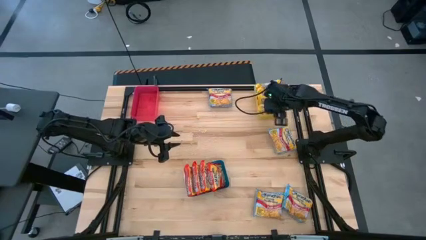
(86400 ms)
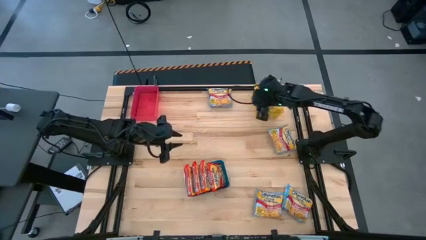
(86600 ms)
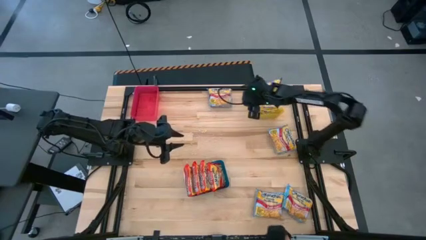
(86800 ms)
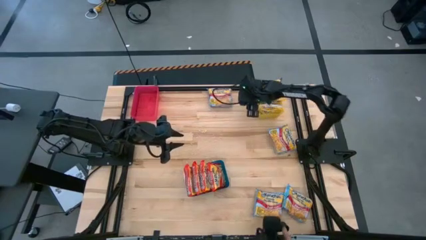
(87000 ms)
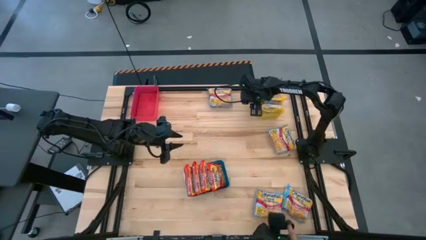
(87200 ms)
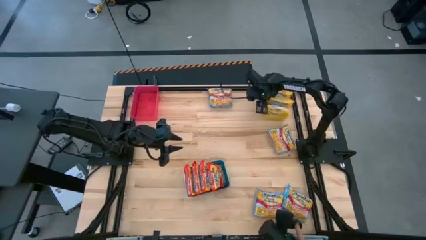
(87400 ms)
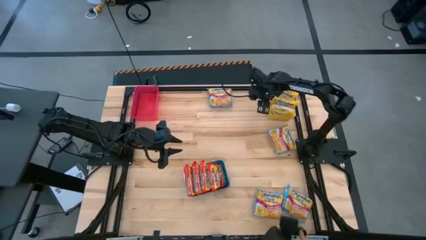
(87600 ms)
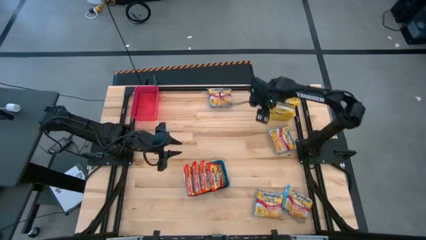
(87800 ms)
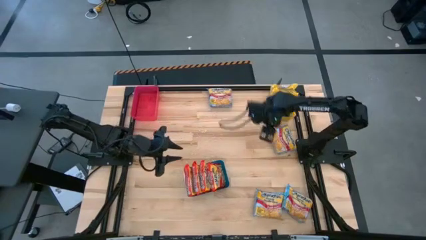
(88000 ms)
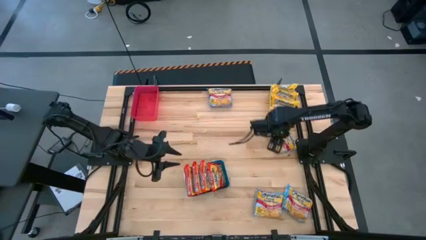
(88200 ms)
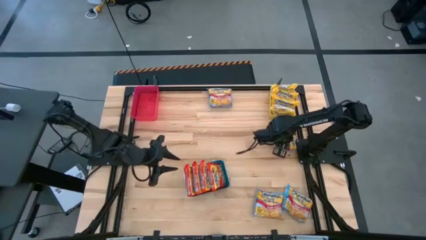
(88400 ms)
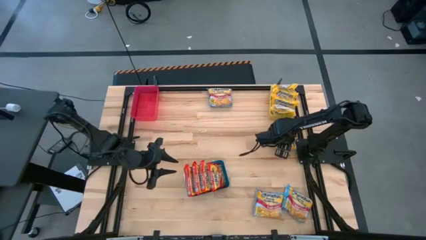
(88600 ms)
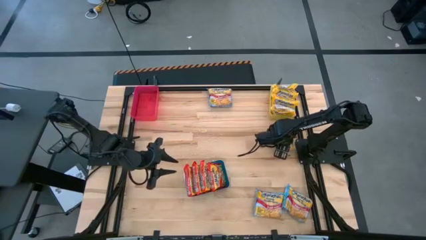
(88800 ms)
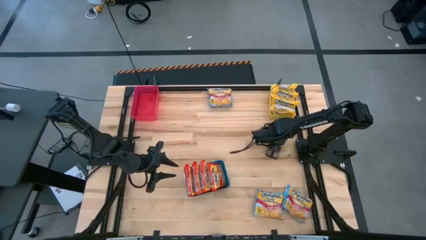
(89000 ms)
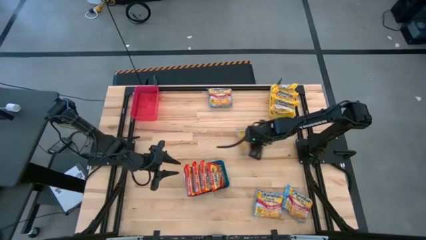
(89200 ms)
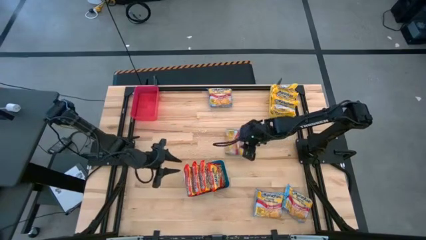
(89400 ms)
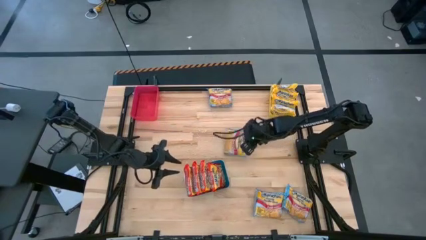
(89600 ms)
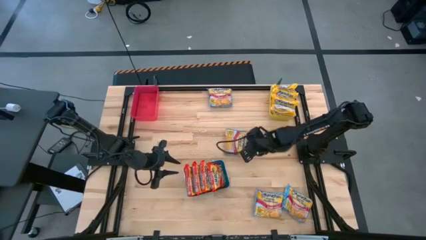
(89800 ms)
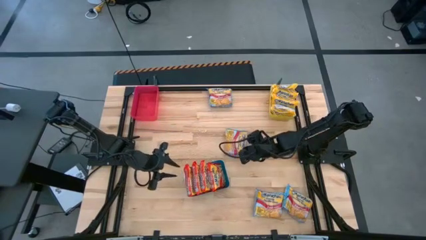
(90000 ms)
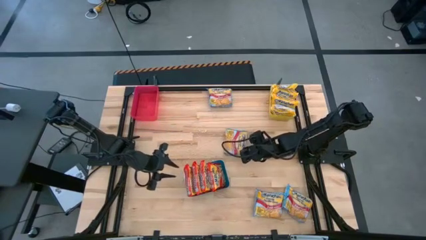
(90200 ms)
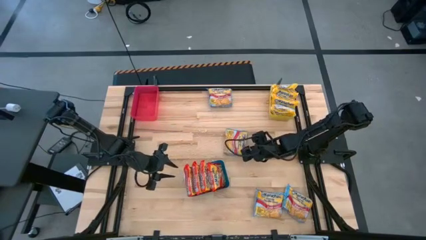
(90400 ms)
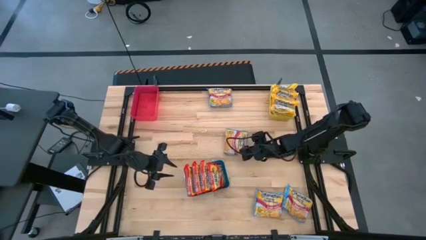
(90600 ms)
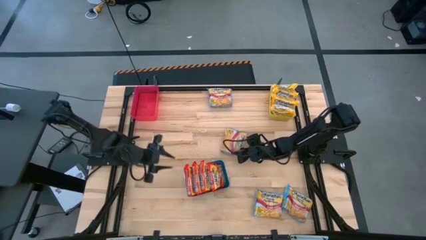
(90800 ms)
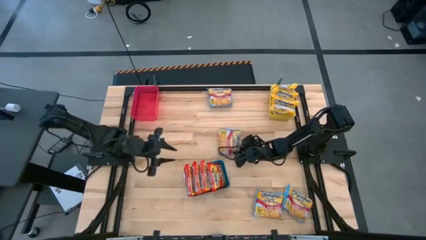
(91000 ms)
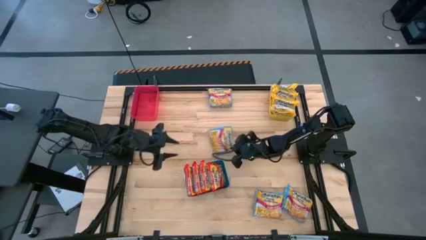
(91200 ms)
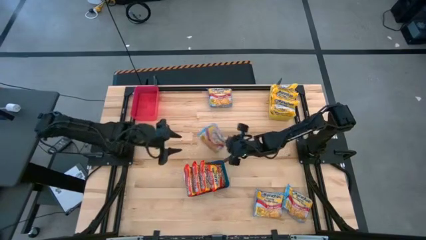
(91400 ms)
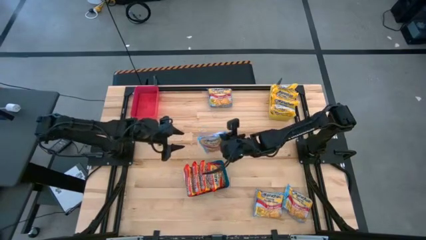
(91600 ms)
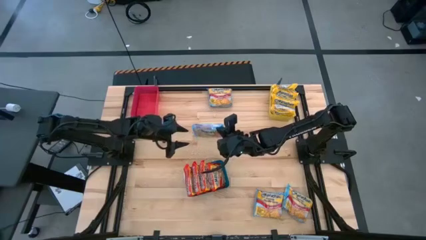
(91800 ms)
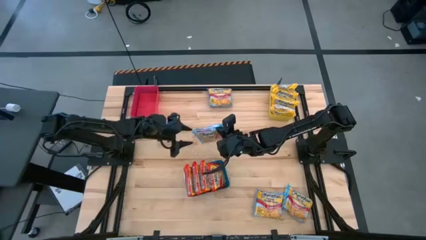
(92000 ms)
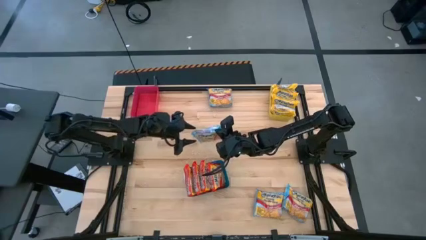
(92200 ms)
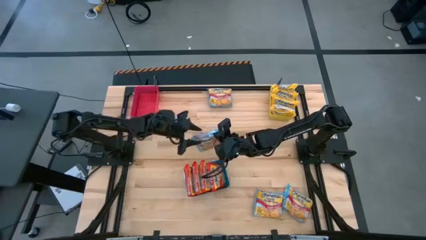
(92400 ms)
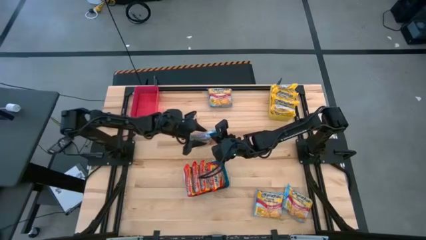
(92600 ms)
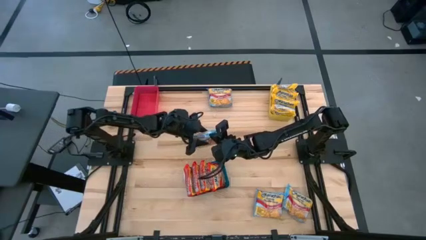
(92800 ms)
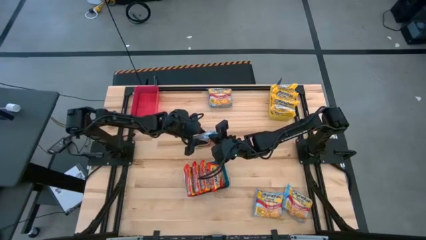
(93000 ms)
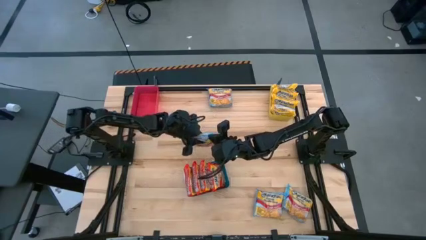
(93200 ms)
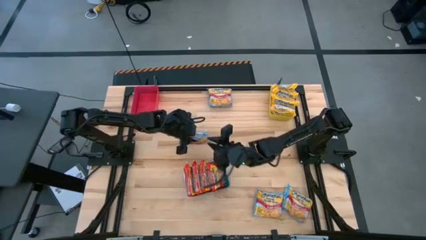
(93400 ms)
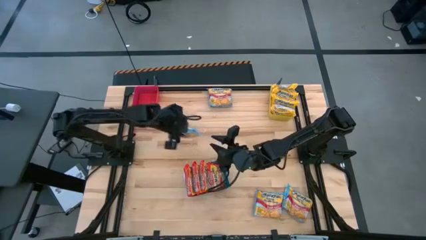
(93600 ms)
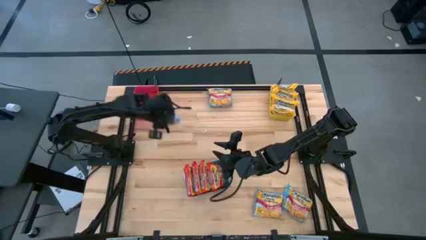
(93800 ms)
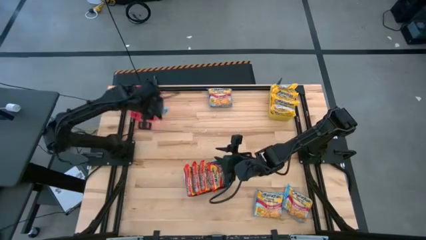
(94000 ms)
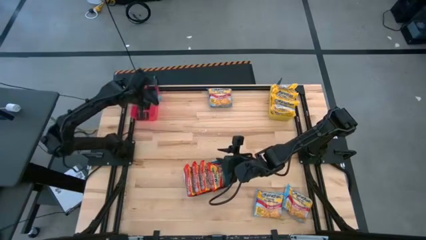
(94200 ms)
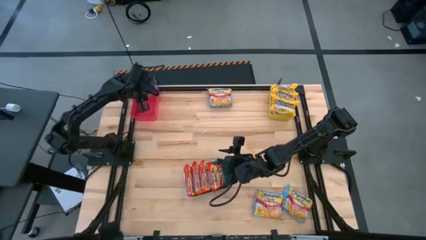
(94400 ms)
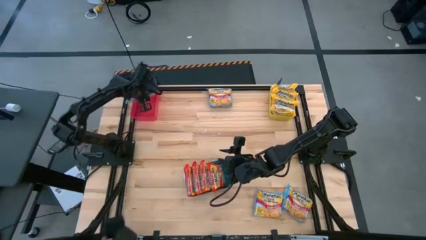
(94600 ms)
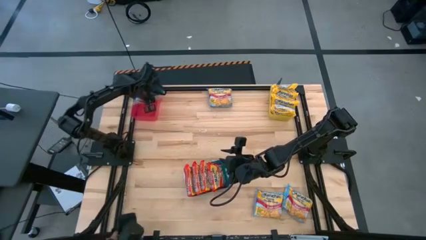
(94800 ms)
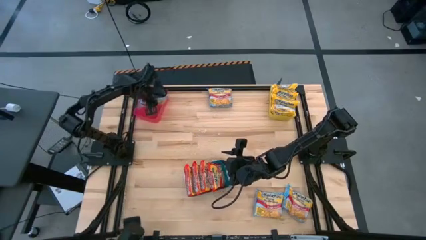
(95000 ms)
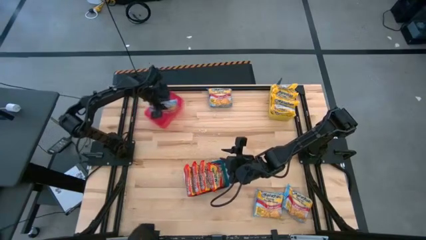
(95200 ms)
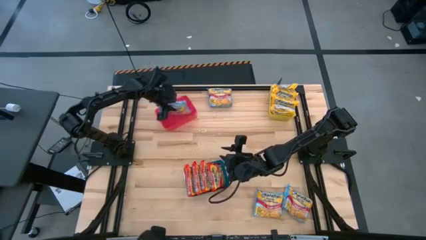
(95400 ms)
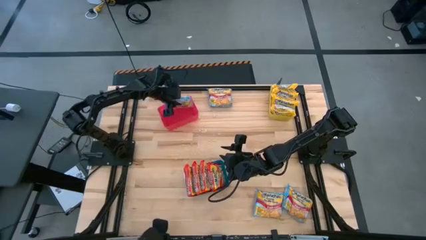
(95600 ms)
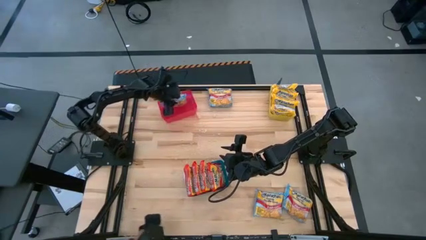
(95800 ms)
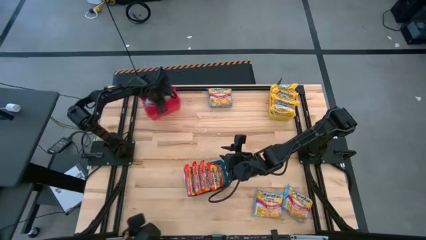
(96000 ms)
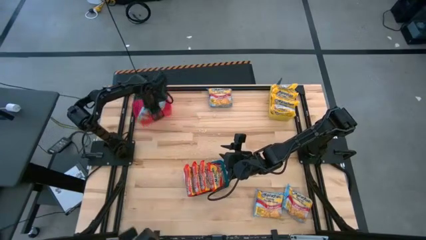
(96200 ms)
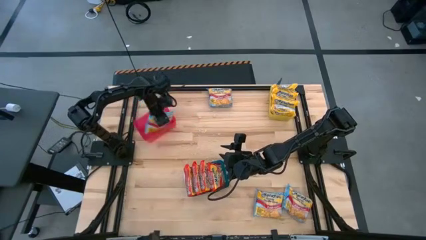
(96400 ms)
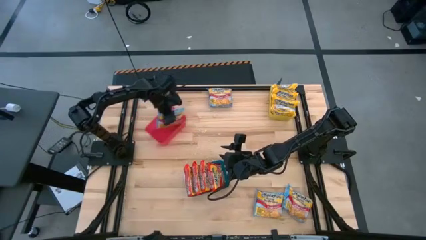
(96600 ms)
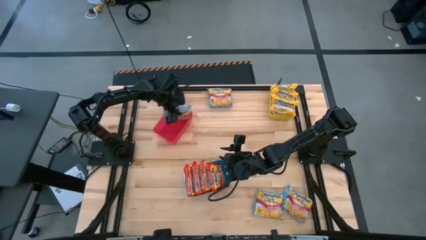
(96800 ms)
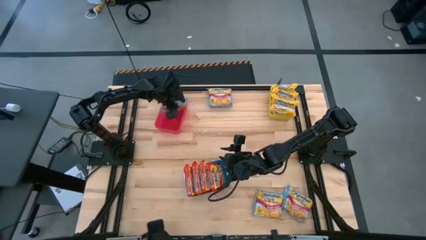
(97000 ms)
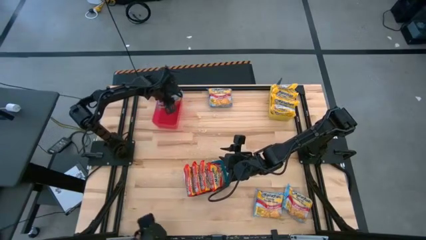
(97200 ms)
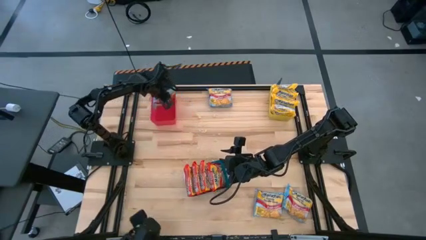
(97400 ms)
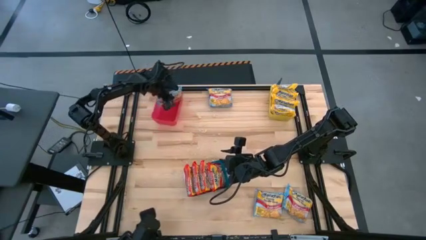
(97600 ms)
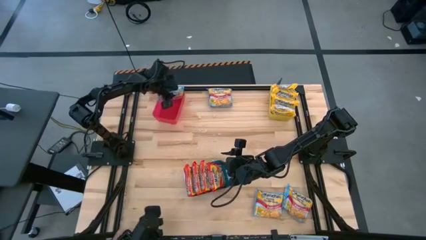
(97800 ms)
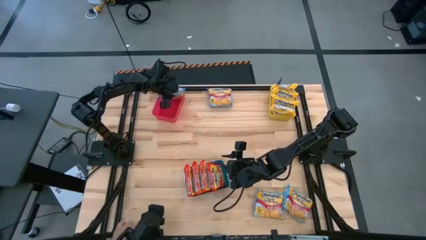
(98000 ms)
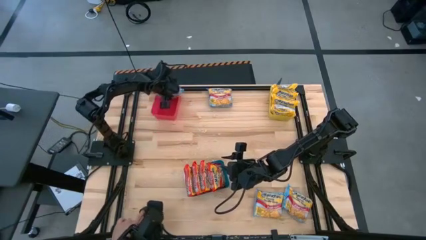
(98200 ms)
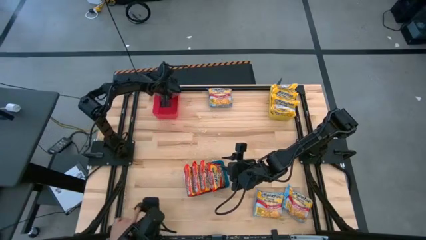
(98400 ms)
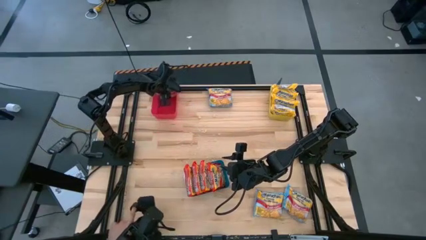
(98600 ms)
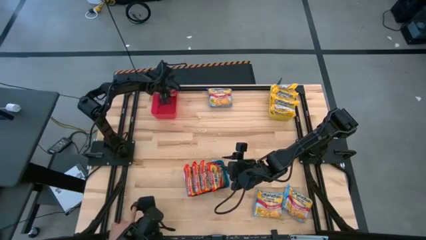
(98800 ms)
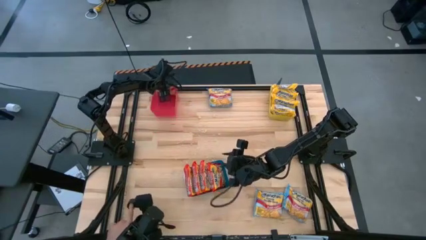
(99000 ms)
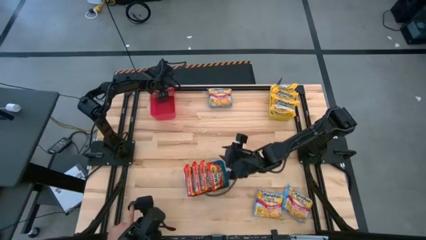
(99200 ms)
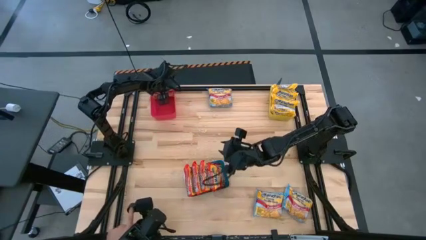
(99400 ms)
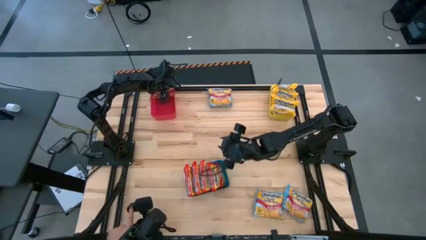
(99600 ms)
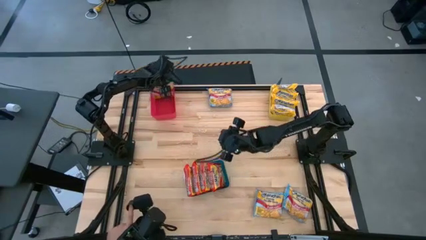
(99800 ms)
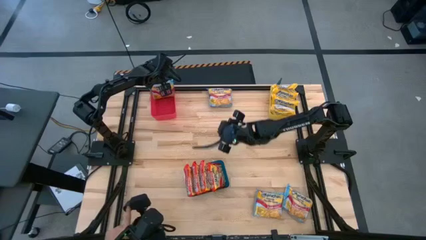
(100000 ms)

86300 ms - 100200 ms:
Task: Sort Maruchan noodles
Put the middle blue noodle pack into the red bin

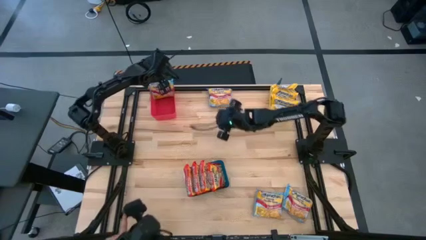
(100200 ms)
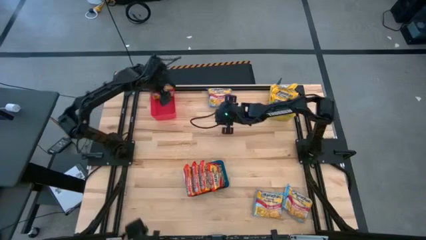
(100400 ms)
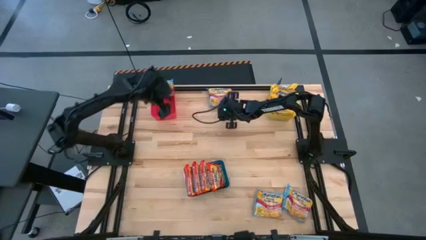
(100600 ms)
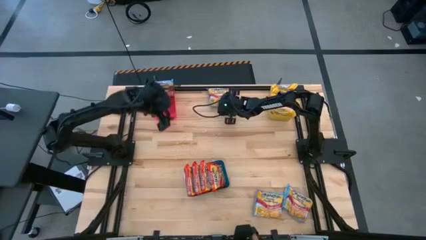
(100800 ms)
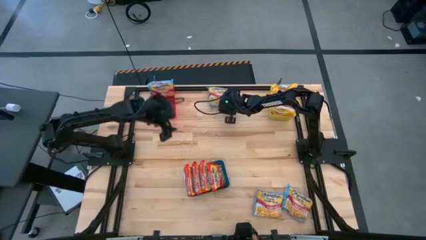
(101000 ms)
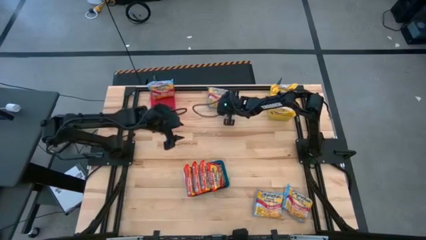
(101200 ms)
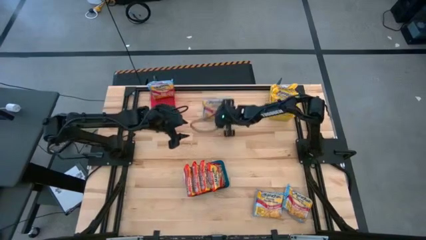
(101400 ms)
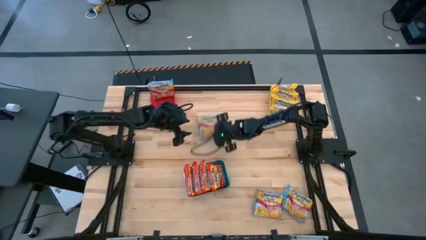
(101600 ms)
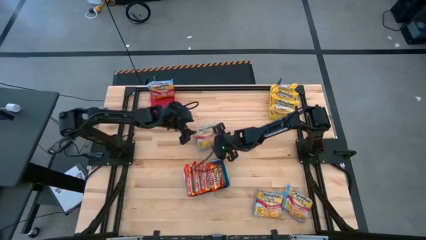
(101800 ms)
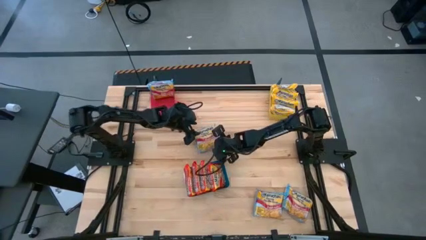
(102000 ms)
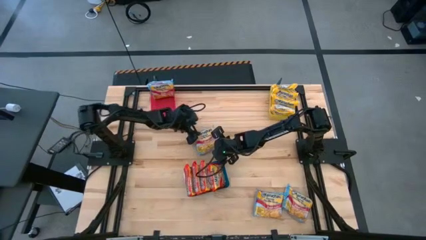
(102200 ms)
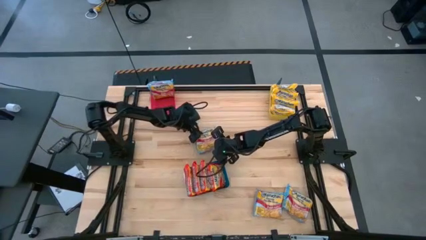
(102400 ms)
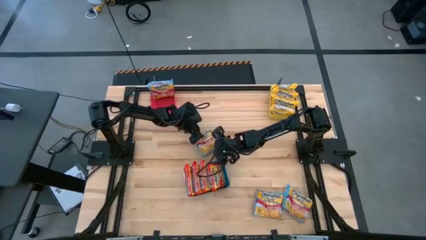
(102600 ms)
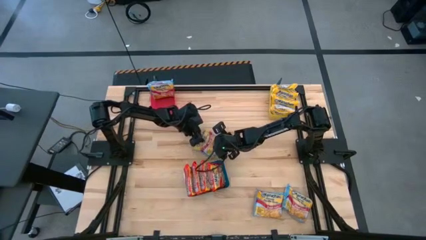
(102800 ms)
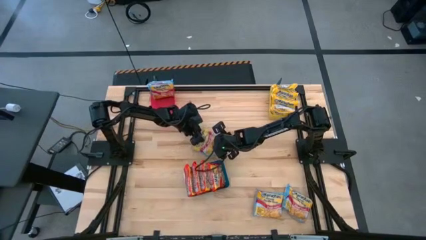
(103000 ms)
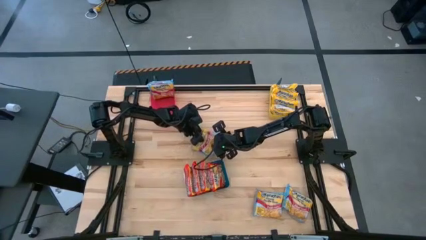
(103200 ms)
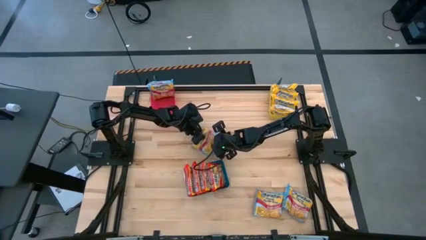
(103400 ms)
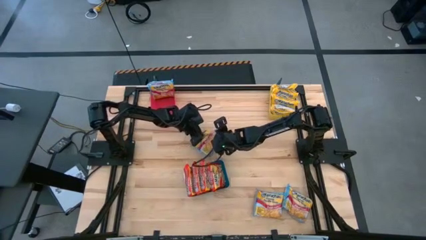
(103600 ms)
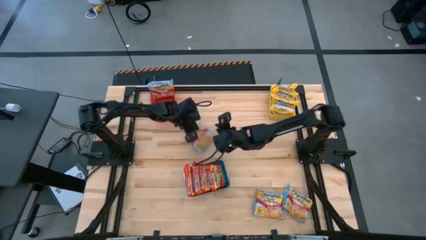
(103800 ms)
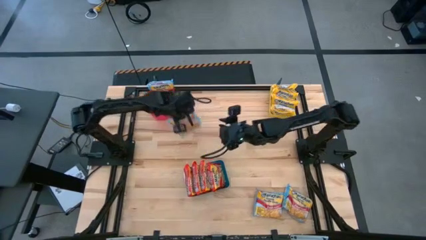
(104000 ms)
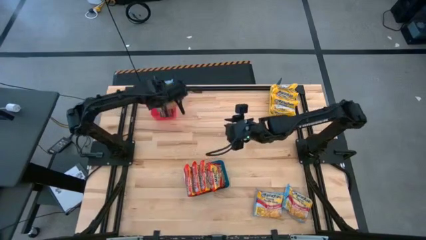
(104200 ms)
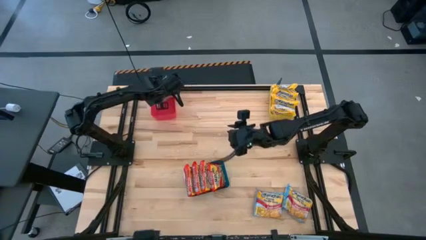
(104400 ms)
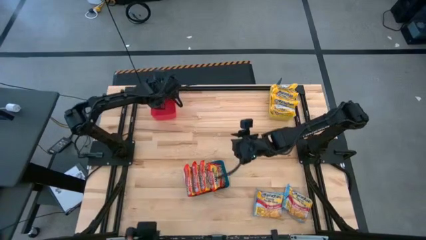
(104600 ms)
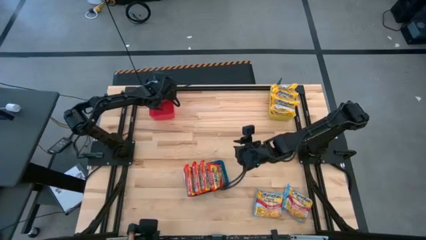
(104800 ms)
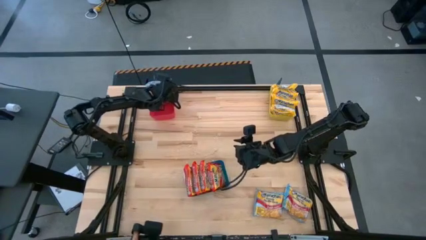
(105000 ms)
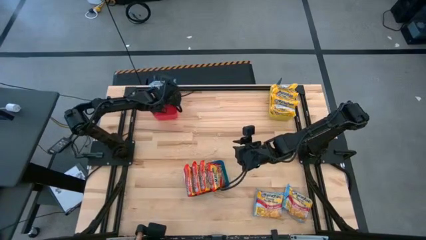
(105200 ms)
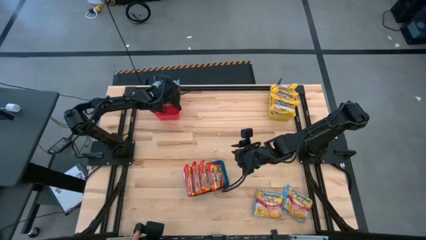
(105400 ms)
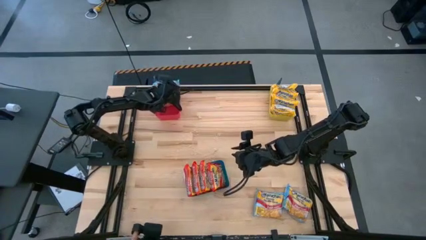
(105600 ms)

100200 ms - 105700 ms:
Put the top left blue noodle pack into the red bin
